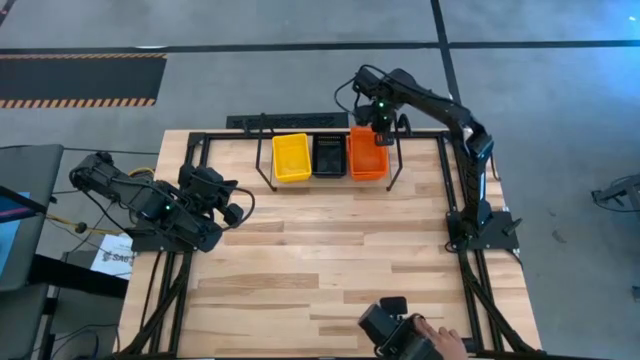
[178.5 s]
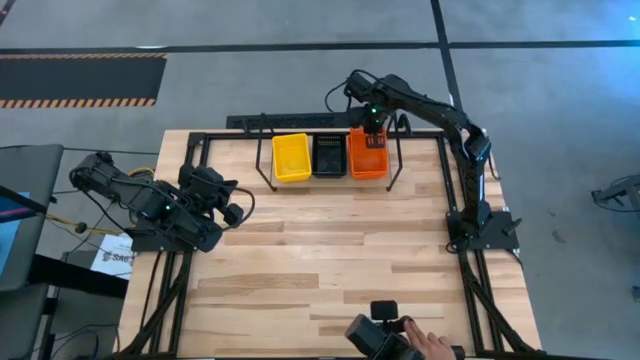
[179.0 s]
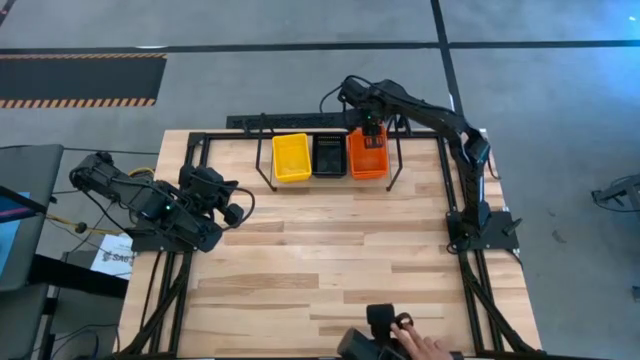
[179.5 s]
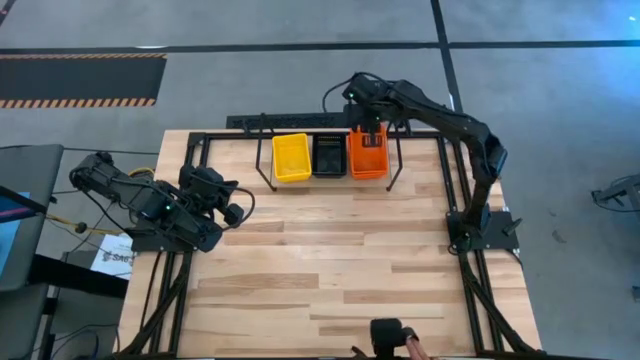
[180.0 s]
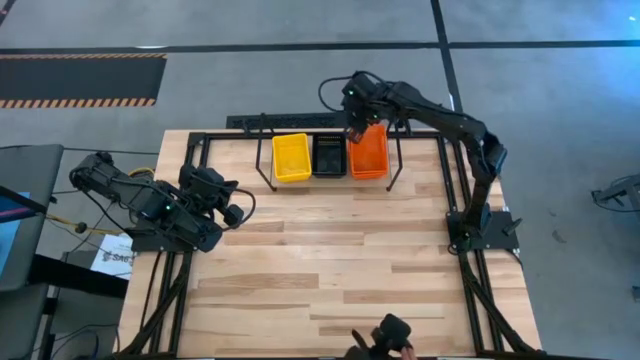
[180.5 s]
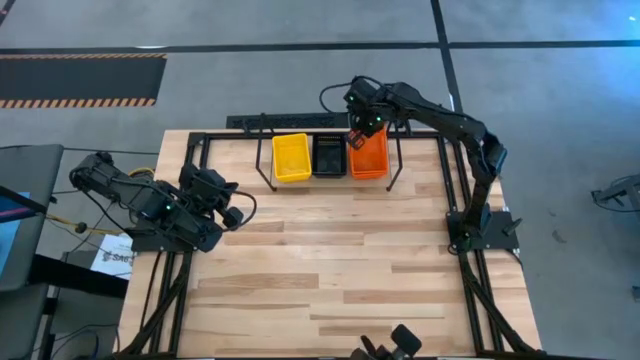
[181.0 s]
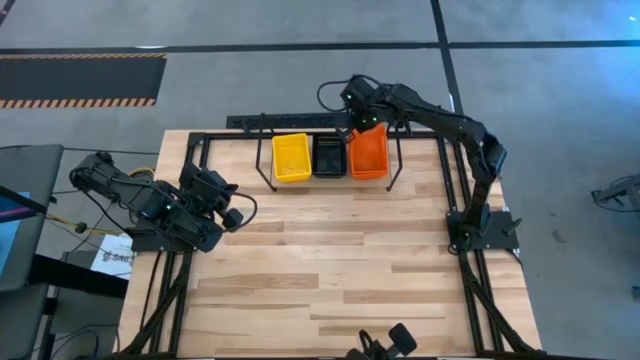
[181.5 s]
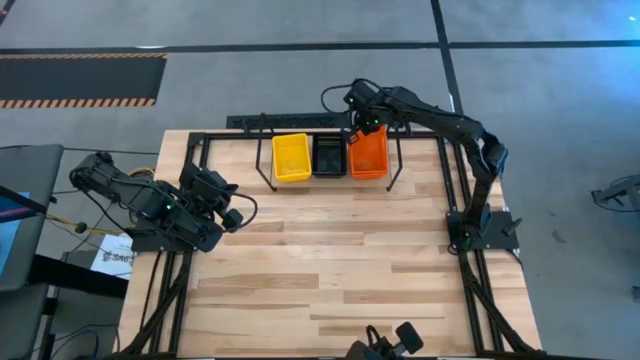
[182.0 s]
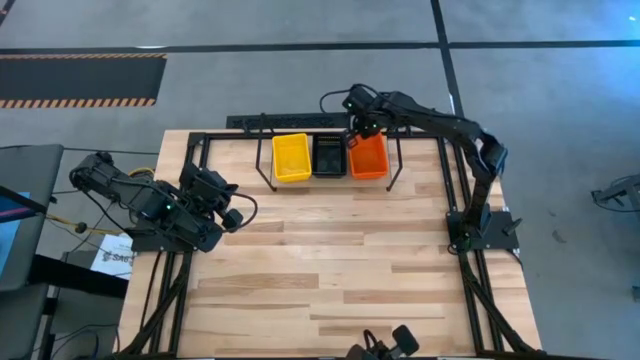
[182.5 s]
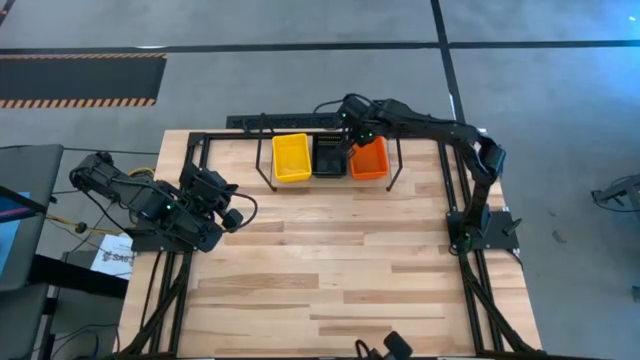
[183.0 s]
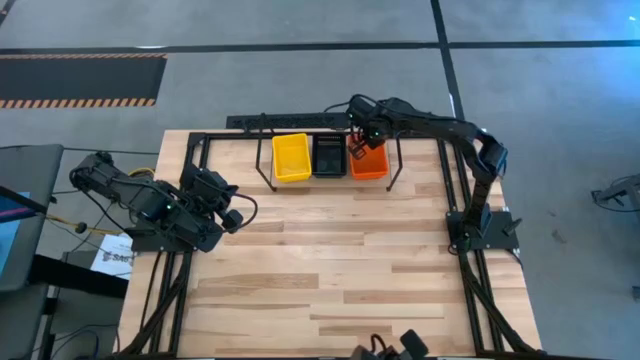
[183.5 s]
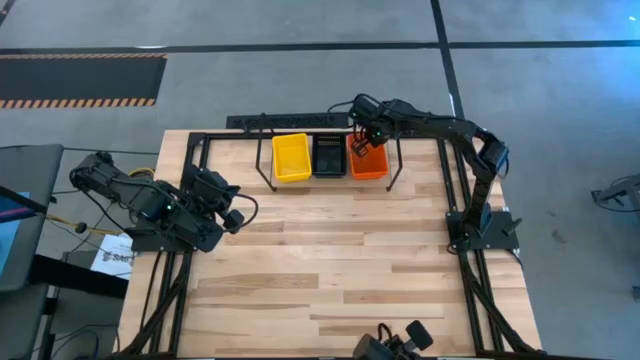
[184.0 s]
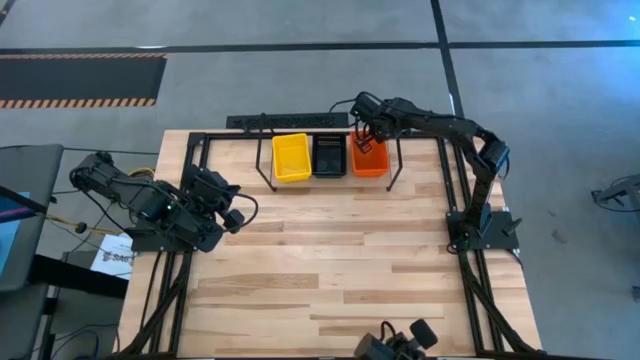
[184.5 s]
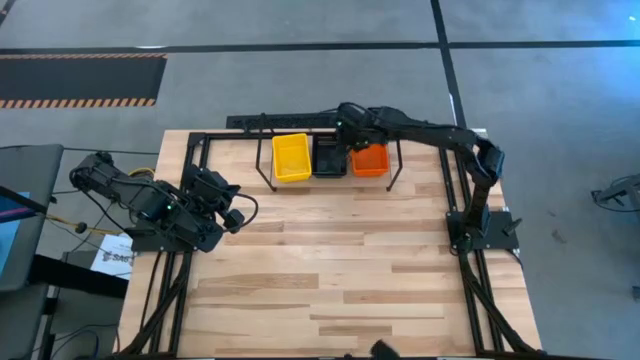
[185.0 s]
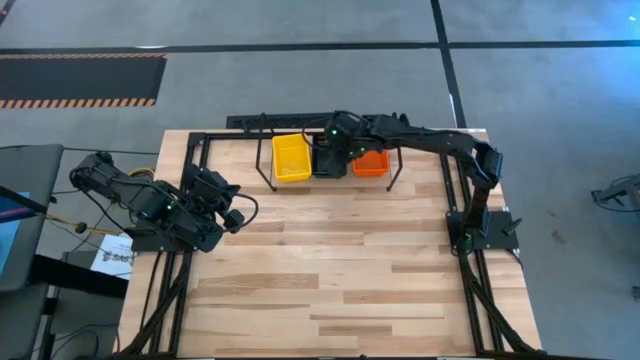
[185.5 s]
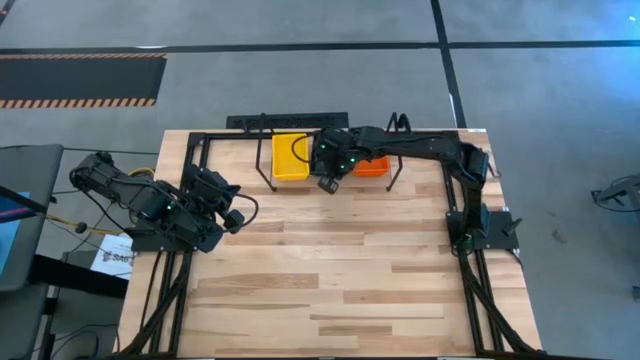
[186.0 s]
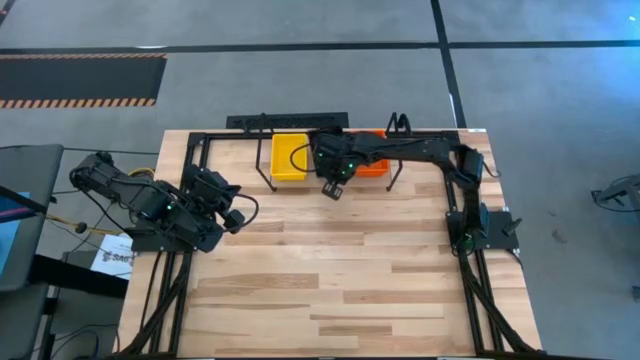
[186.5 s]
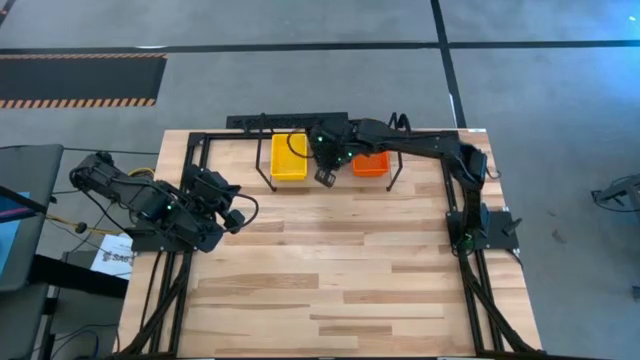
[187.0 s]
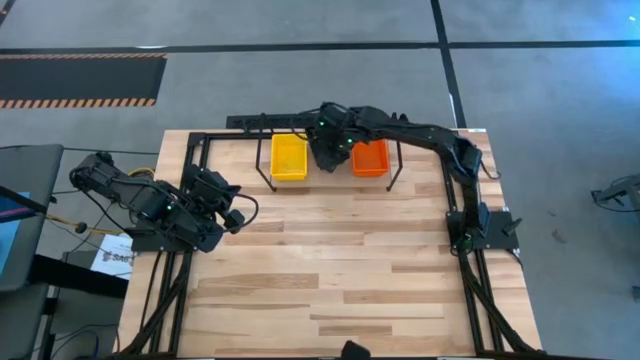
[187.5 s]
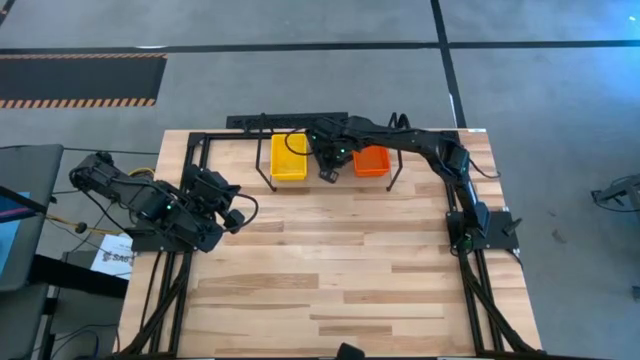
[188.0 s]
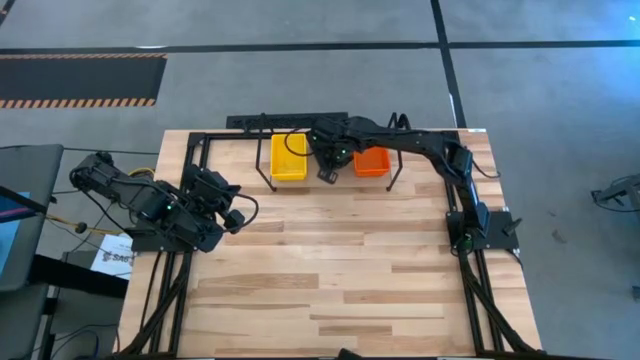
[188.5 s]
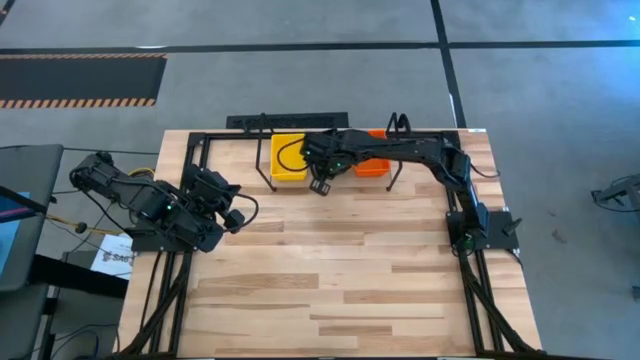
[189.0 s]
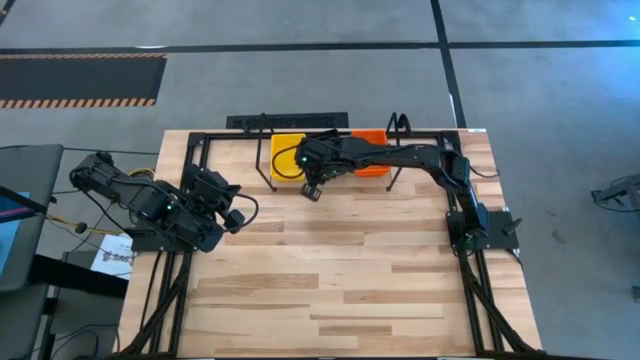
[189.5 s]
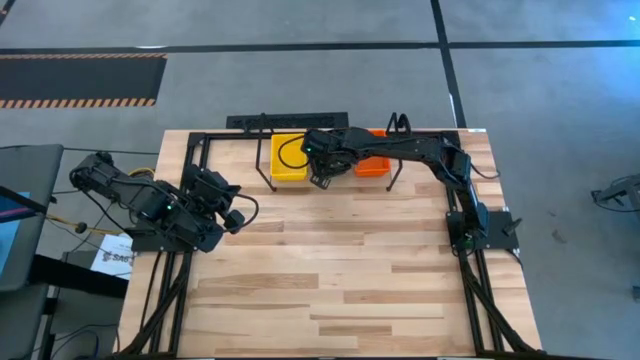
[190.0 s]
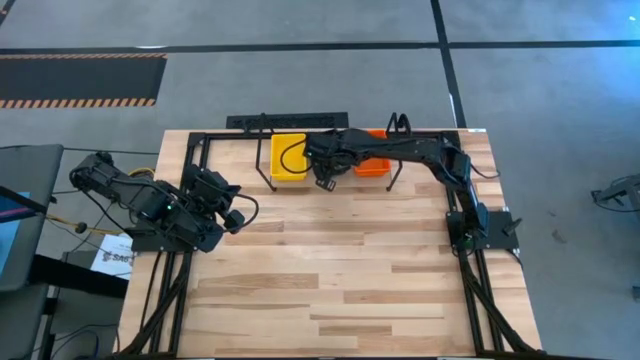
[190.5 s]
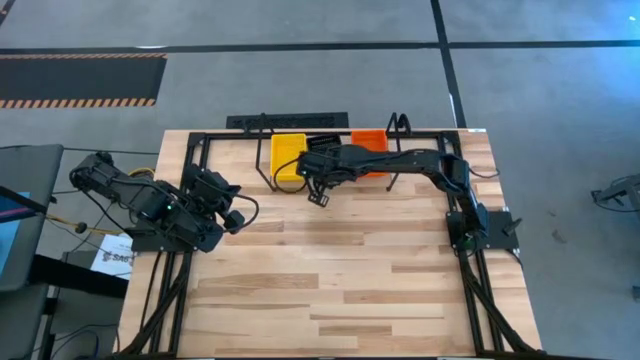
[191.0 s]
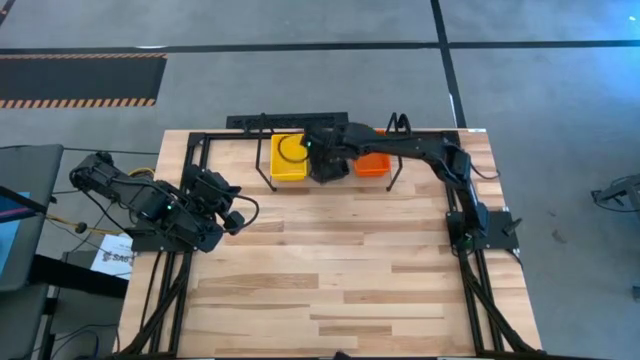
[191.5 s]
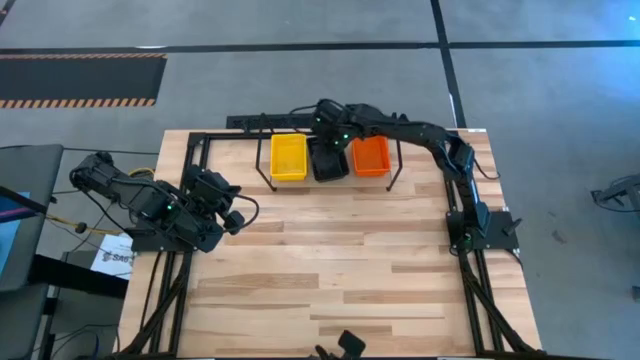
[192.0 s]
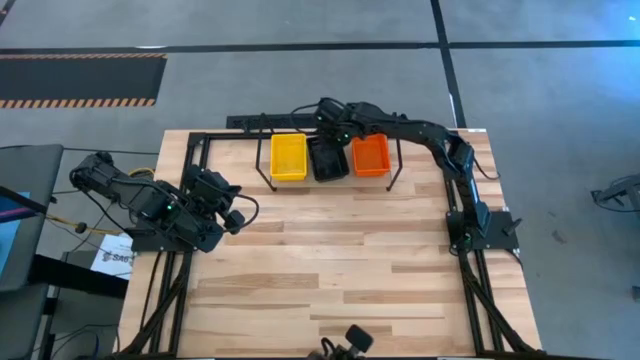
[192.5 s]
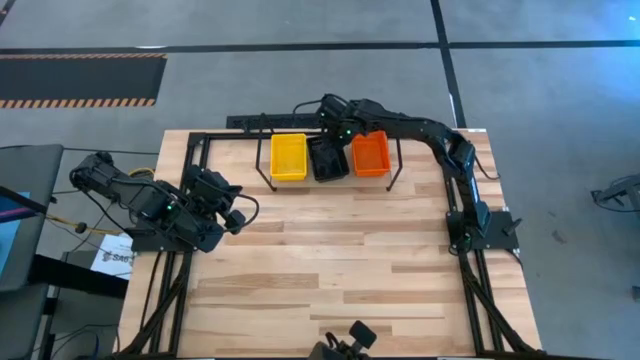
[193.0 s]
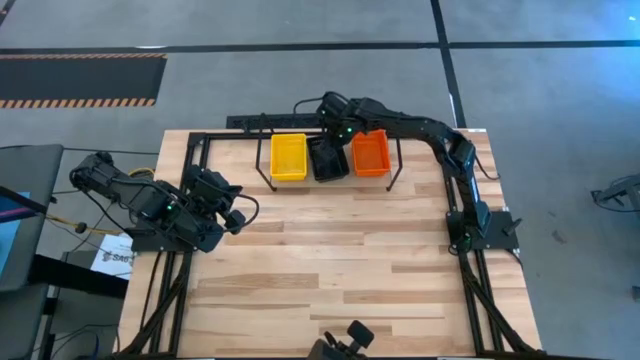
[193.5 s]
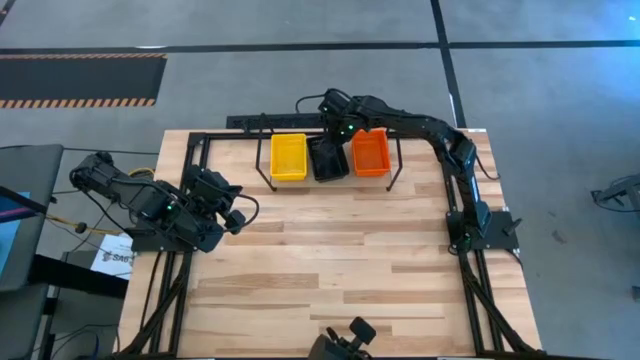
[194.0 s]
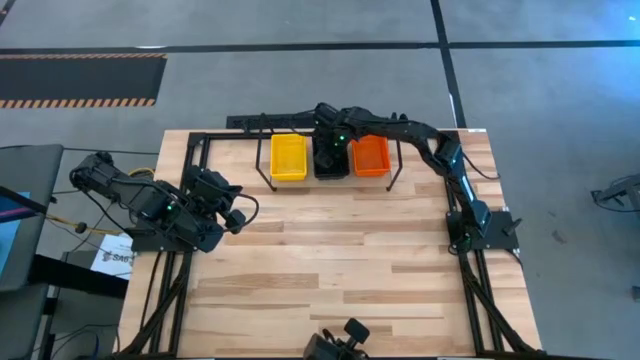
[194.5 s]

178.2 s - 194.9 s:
Task: Stack baskets on shelf by color
Stack the orange bin on top of the other orange bin on the shelf

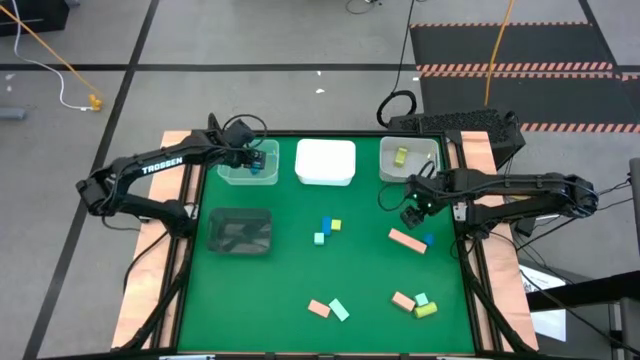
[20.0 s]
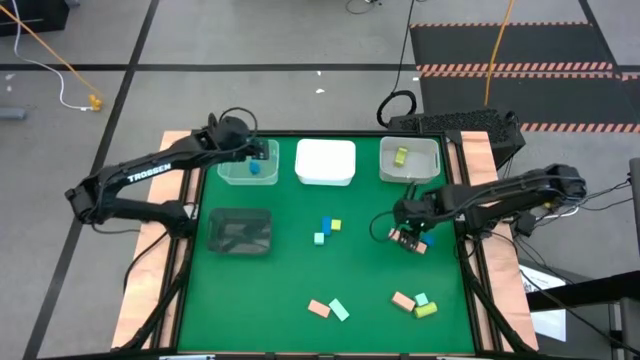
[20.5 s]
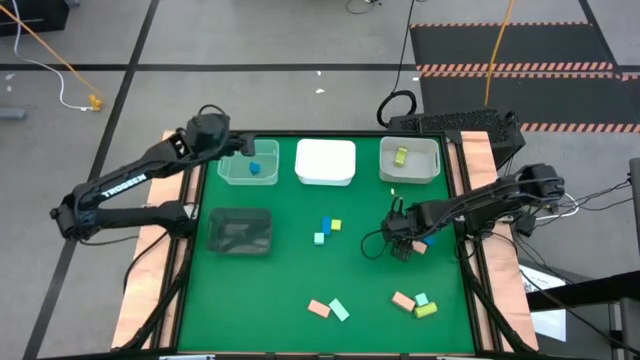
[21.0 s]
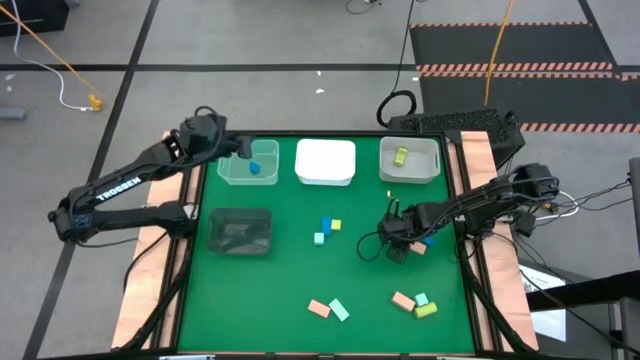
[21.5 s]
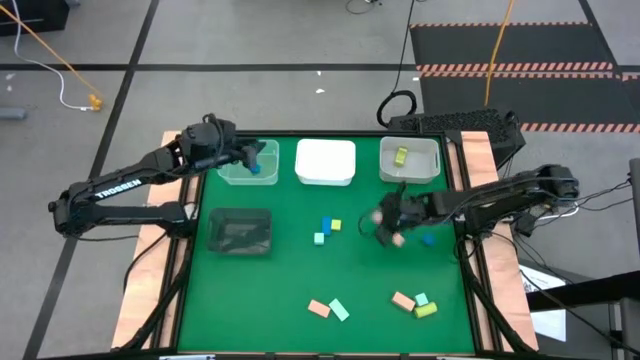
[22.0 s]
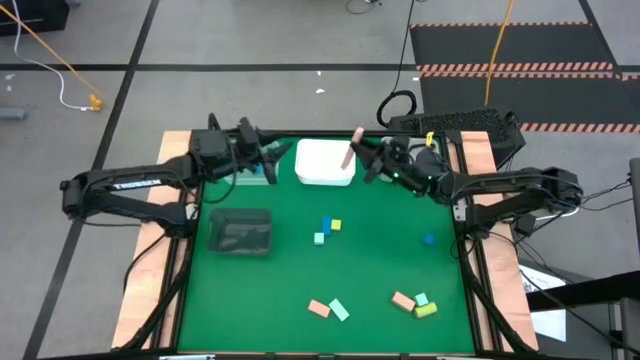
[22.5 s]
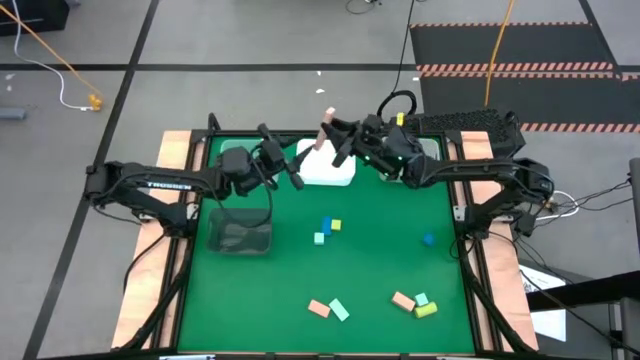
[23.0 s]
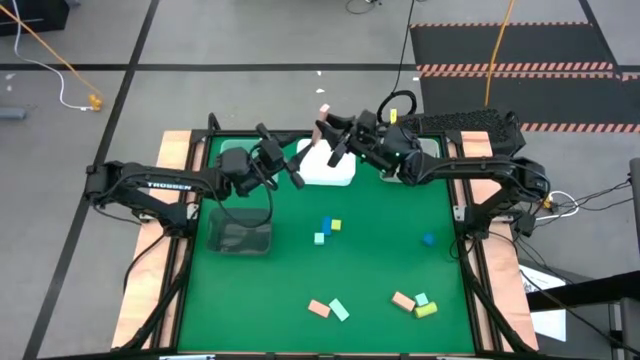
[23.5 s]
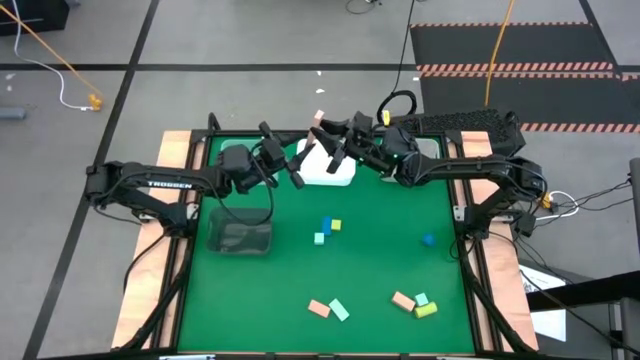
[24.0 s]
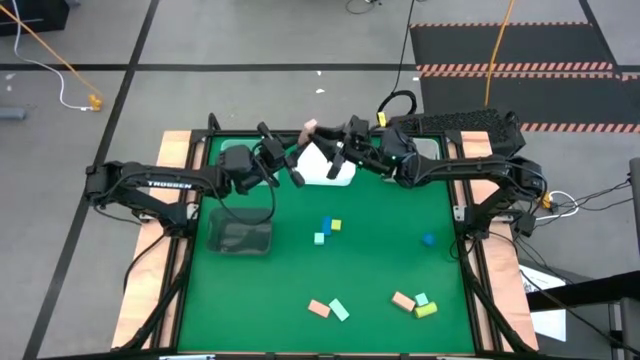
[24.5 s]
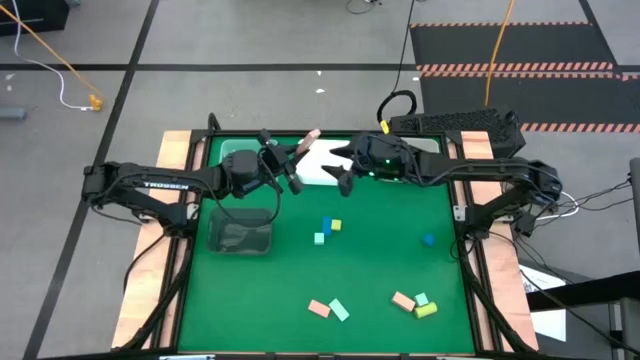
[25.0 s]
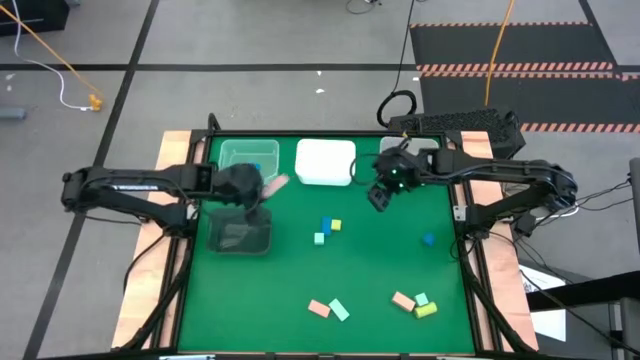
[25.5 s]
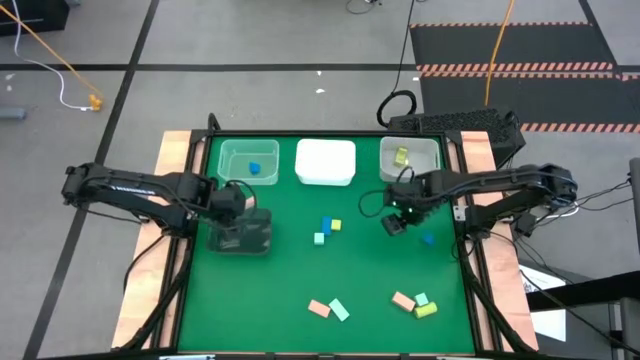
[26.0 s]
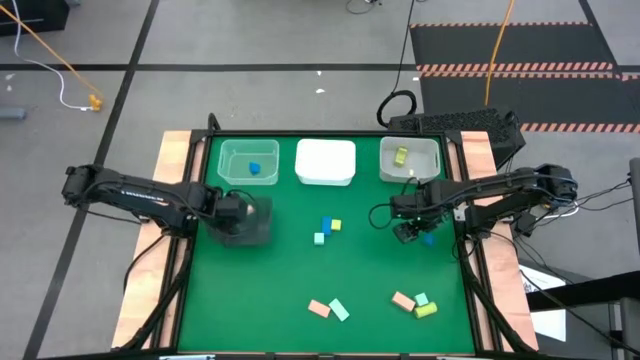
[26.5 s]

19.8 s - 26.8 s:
Task: Sort & place blocks by color
Put the light brown block into the black bin
